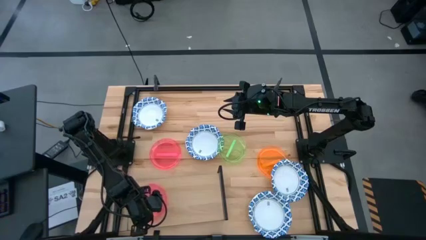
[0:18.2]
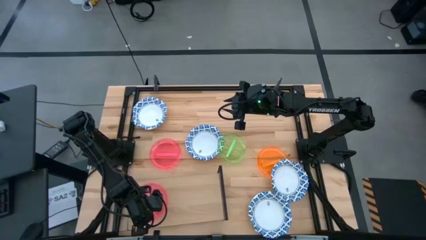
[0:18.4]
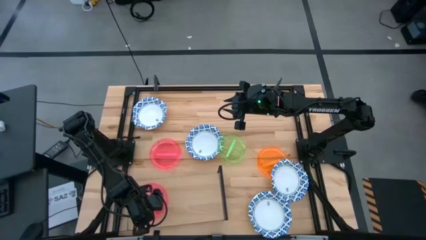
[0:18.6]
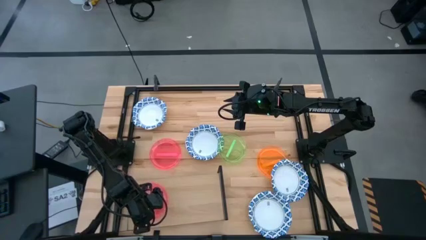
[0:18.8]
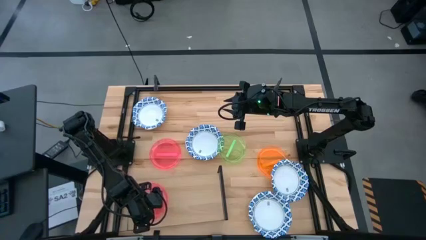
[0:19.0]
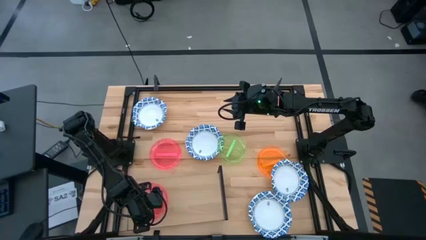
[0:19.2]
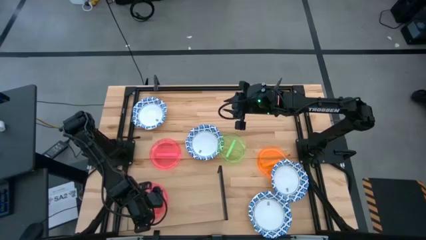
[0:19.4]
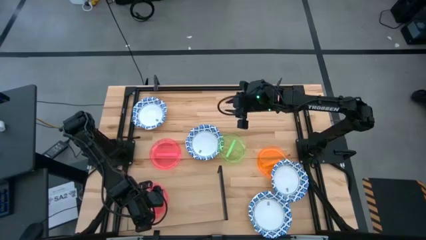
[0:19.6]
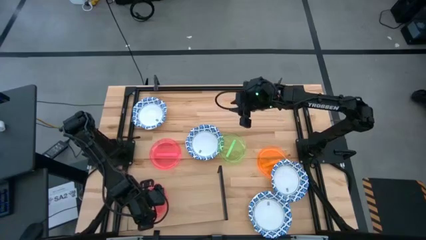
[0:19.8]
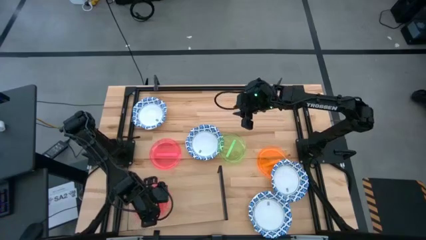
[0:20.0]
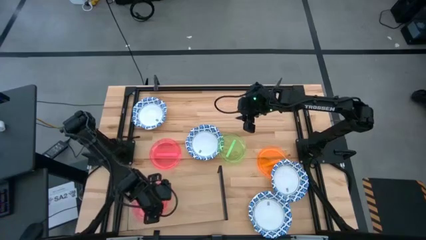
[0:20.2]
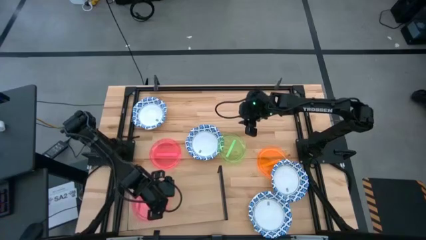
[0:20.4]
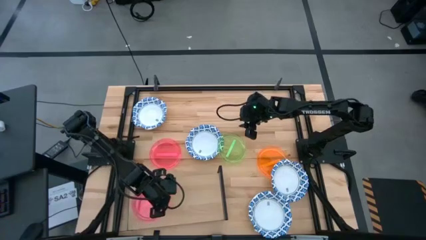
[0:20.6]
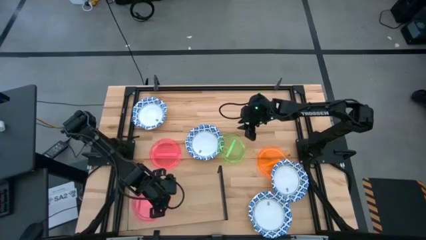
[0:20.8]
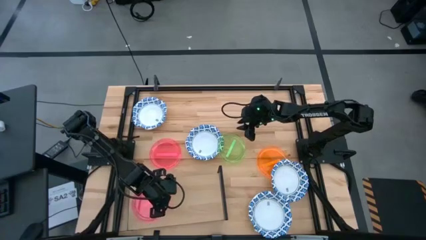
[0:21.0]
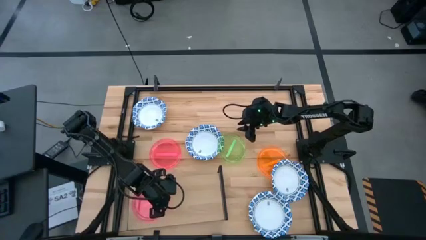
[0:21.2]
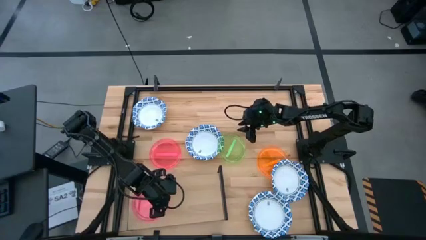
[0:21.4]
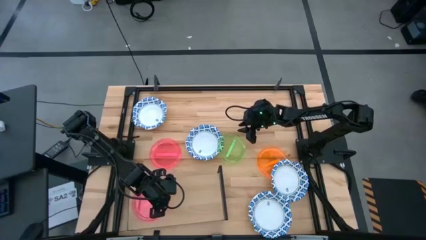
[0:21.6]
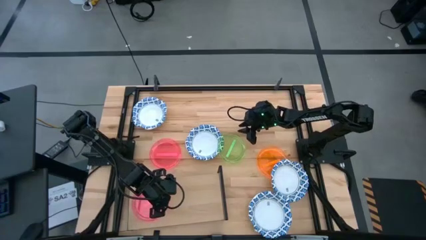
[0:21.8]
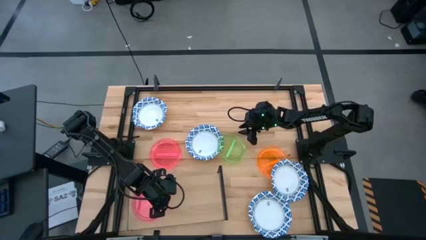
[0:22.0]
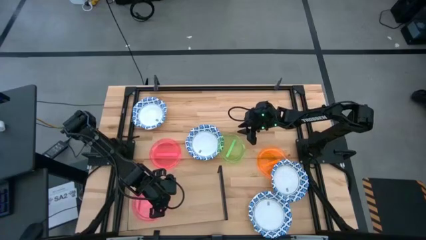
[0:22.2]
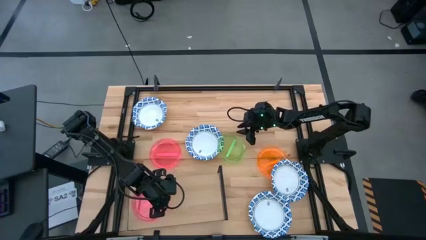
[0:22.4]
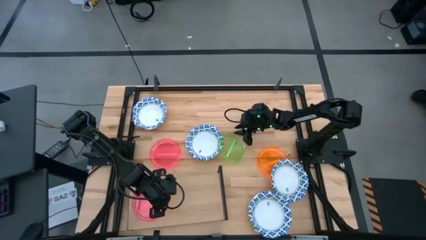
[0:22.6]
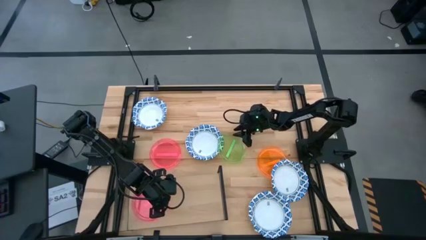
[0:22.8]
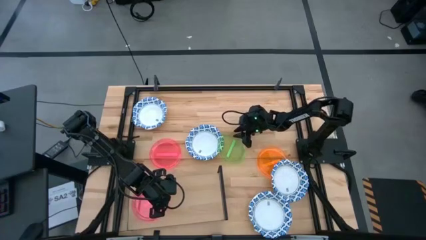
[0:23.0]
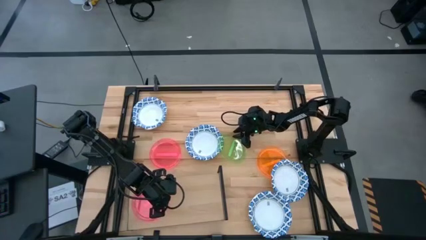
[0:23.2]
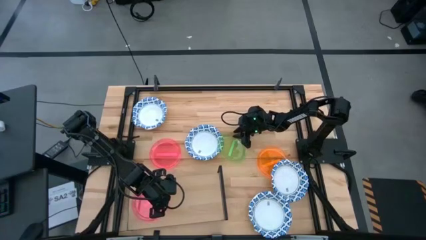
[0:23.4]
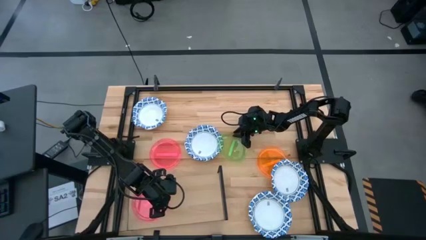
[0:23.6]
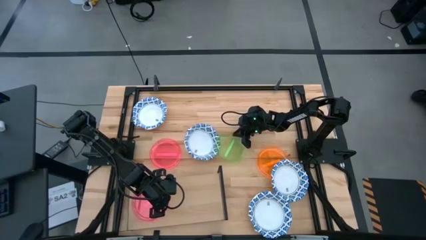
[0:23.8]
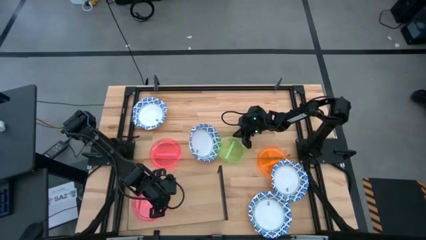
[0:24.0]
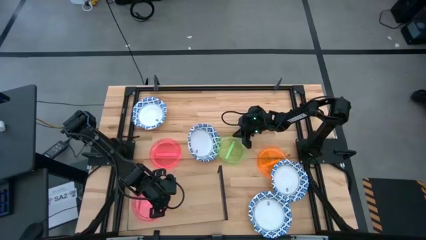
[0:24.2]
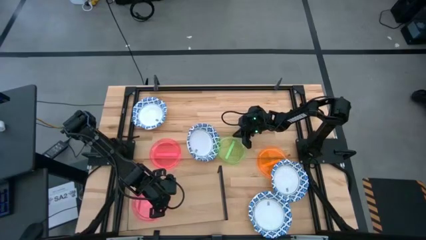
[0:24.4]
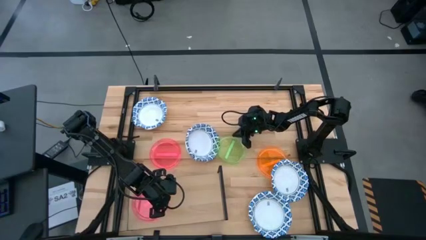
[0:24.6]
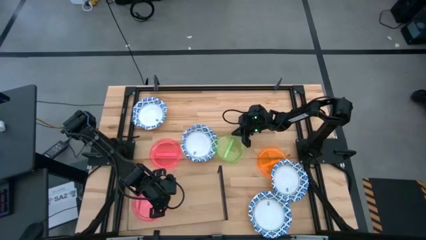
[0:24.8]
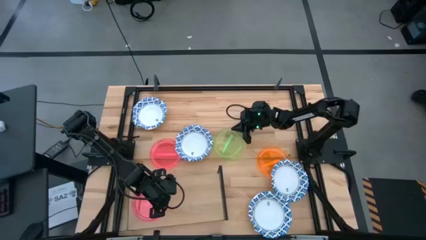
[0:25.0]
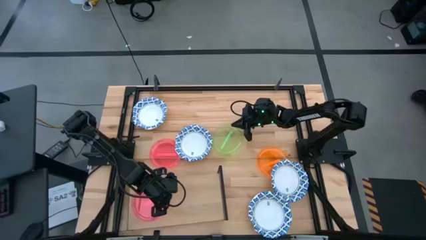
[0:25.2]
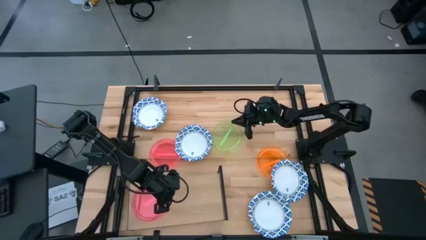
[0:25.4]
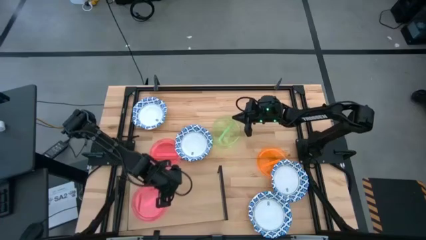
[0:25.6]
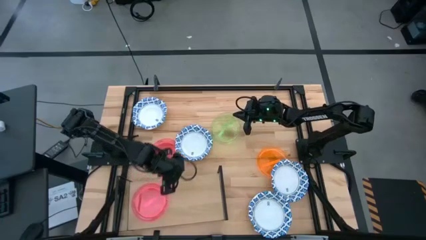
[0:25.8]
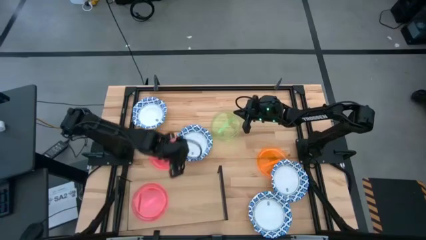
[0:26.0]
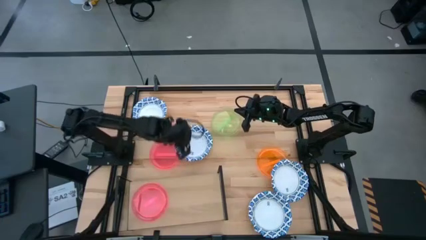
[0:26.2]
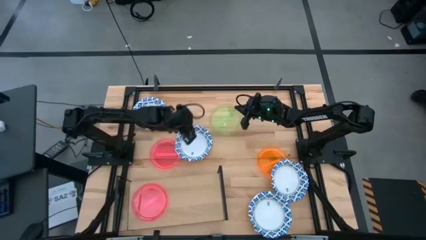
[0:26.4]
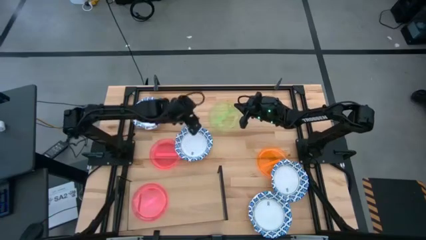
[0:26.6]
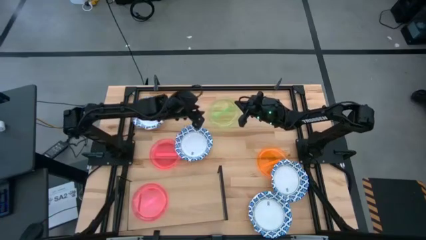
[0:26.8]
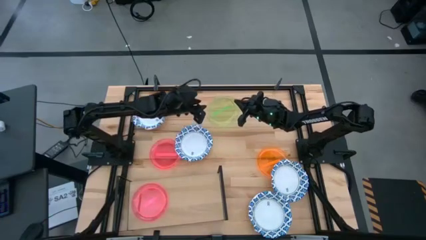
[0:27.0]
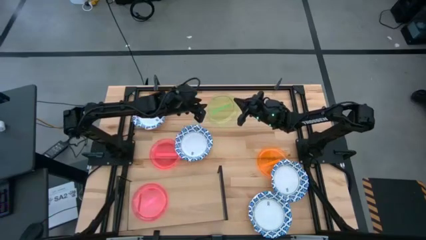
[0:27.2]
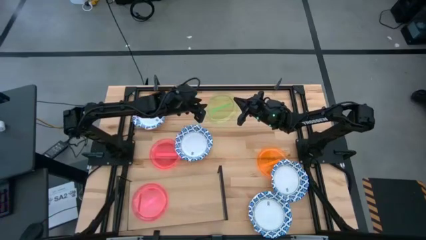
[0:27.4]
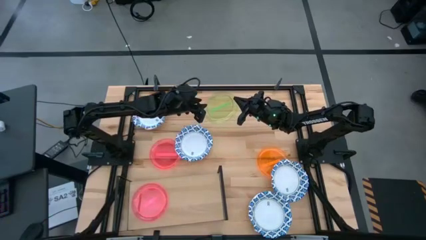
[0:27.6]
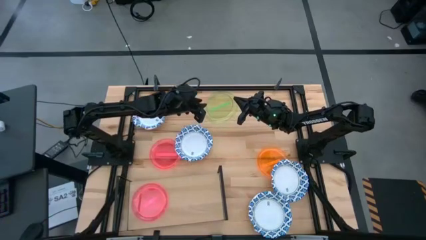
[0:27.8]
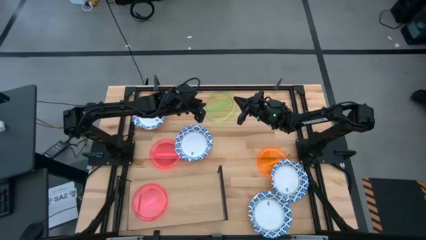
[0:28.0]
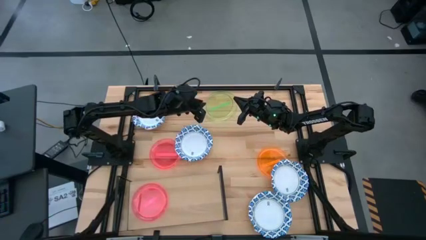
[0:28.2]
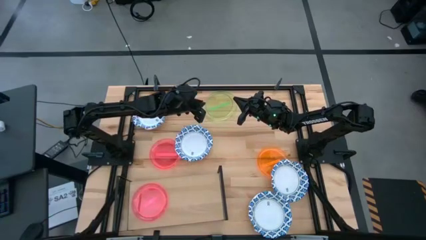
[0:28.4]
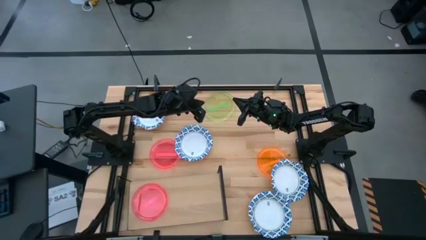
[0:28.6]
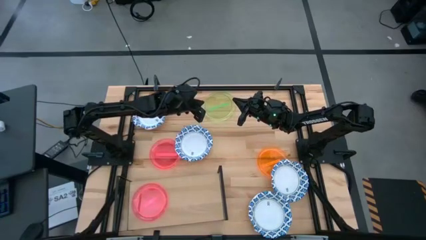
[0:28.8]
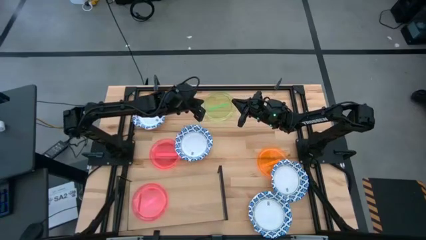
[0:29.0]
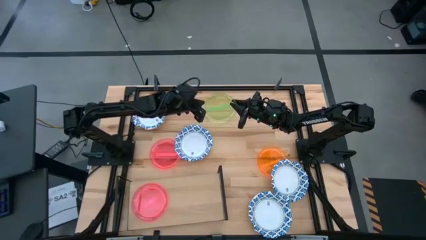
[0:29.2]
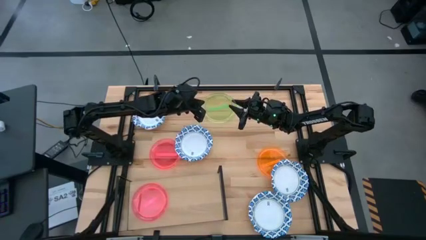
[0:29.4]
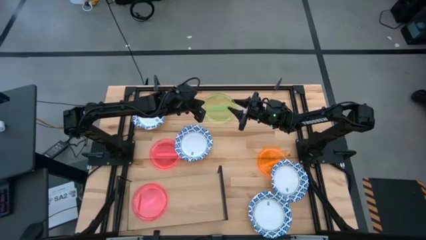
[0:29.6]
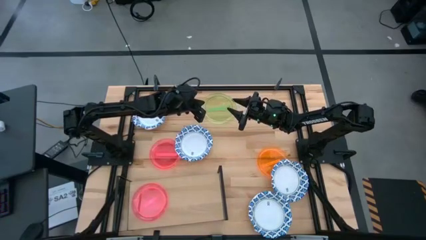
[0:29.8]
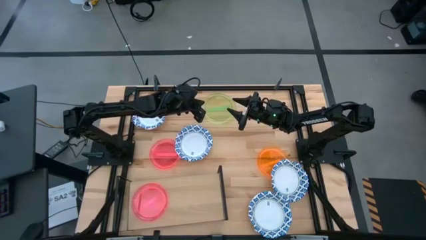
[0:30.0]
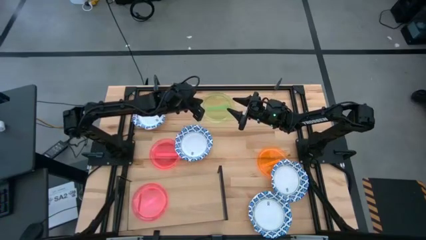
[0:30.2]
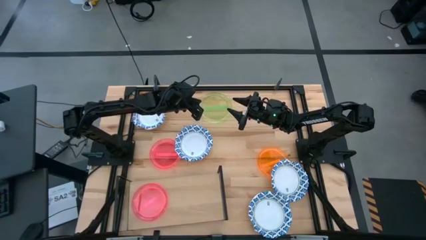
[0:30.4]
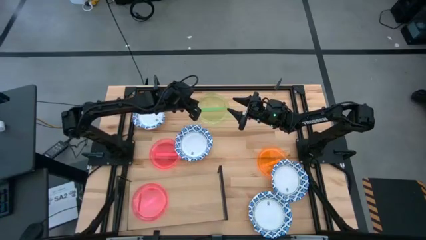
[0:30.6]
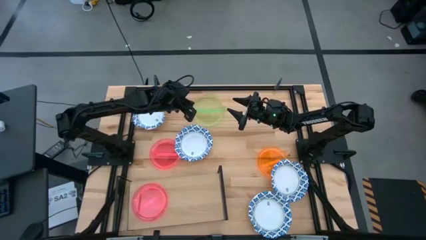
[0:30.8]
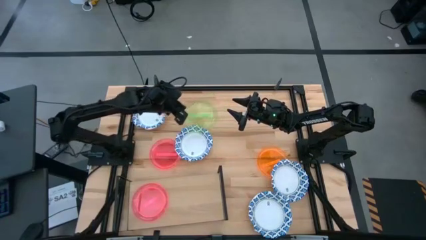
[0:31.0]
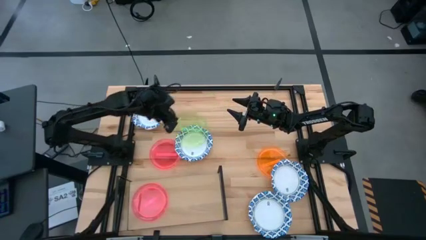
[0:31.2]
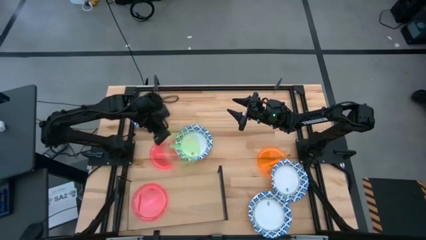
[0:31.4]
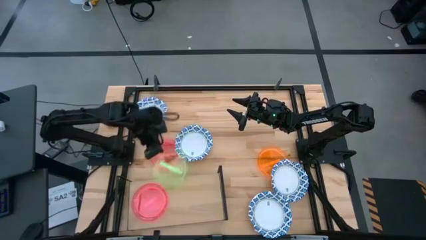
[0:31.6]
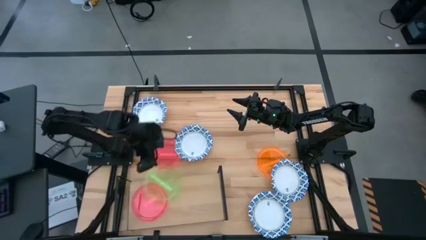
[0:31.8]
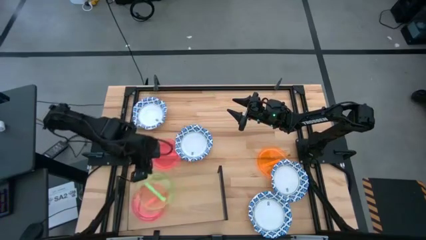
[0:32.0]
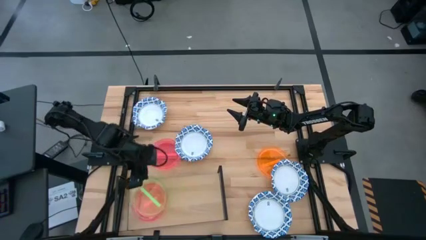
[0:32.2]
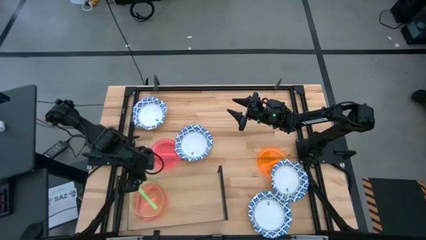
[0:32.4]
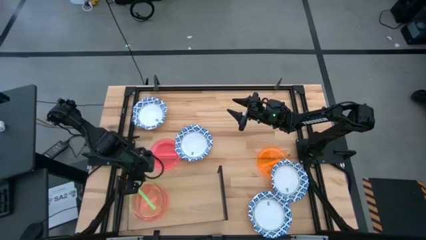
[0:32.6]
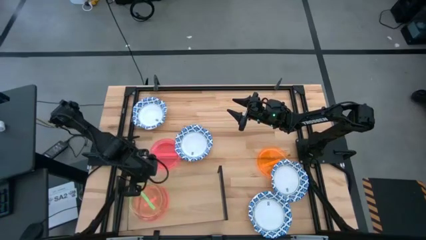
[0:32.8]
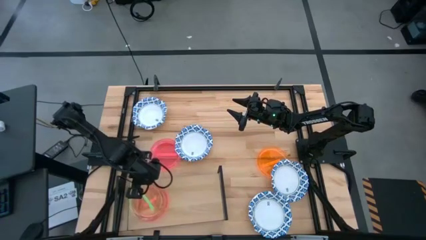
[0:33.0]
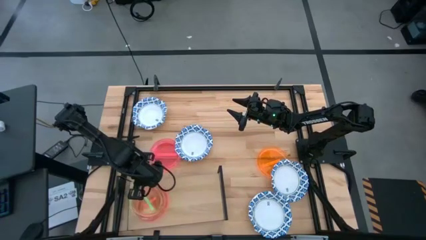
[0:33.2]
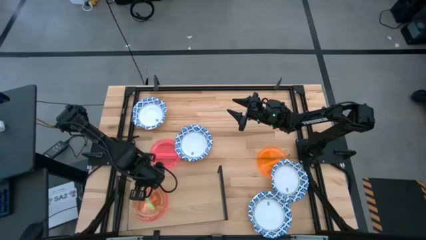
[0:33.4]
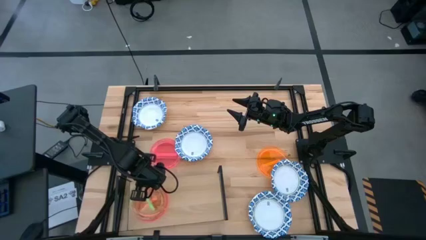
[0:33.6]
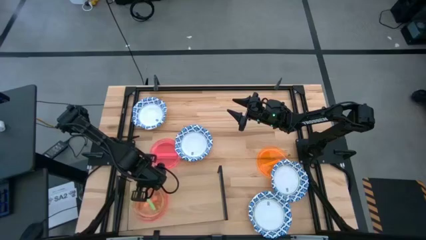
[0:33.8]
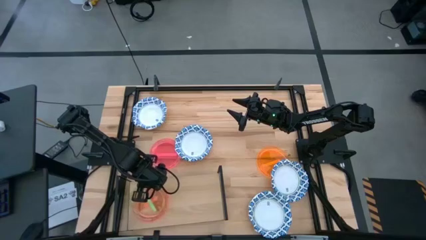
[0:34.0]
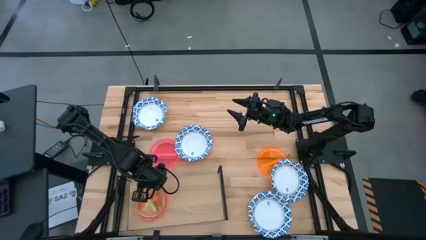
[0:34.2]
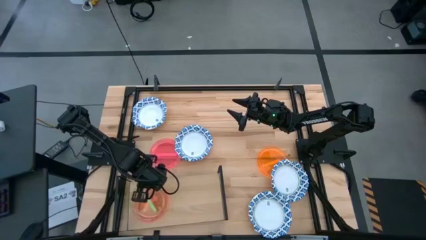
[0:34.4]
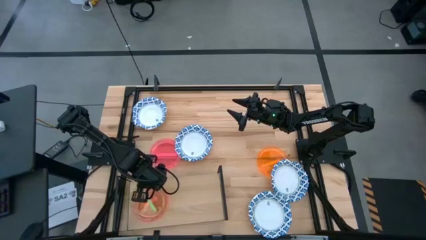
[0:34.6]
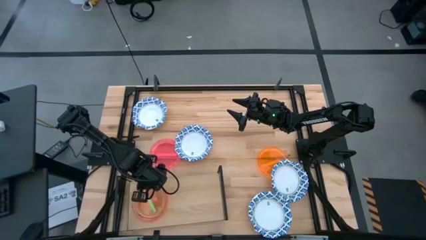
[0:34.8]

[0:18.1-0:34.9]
Task: Place and stack plates onto a shelf
Stack the green plate on top of the pink plate on the shelf
